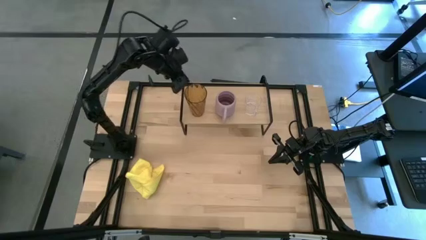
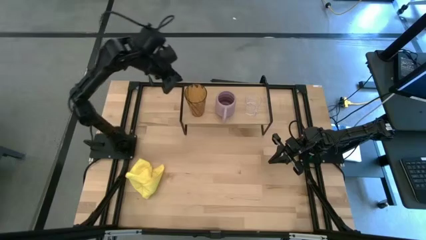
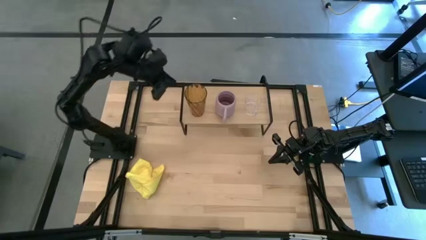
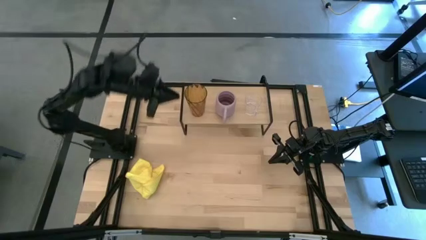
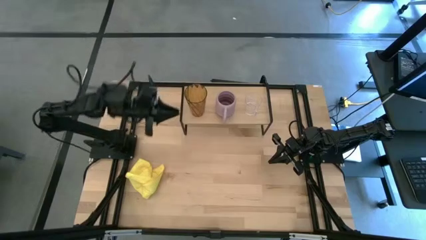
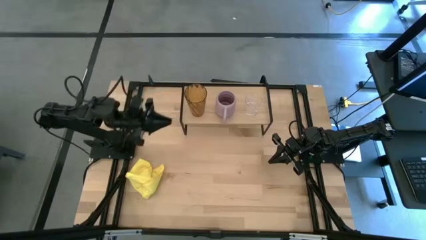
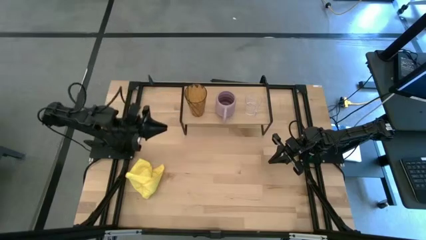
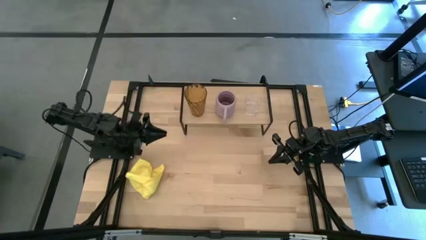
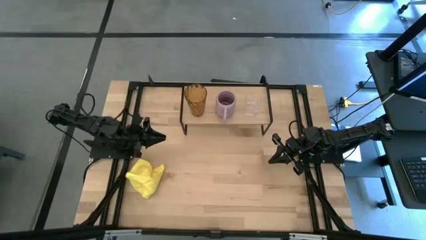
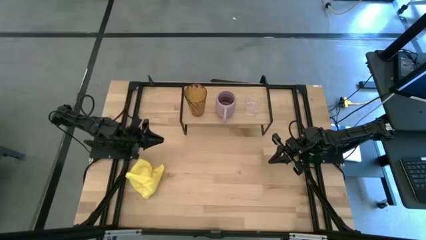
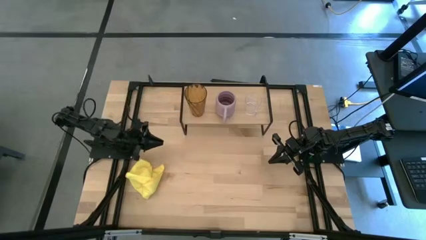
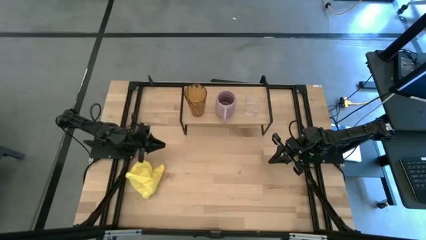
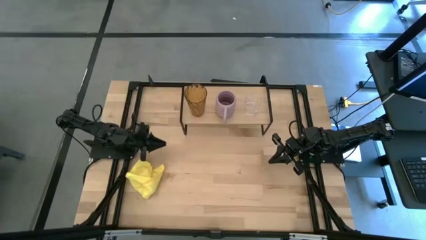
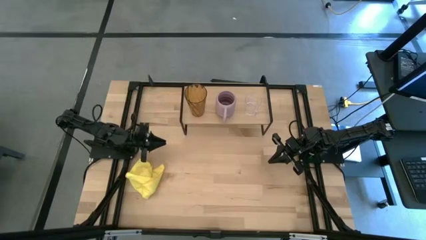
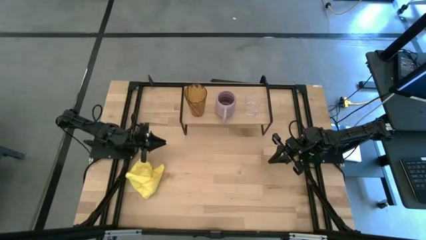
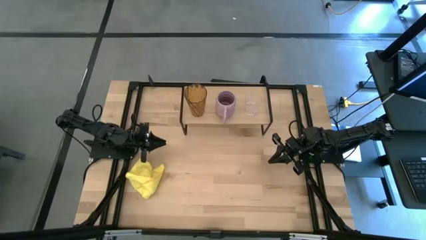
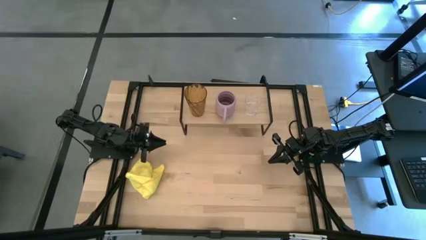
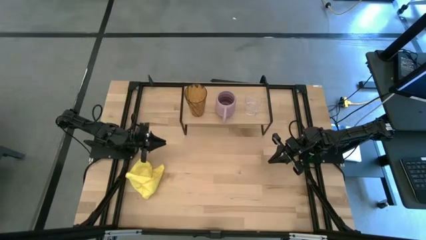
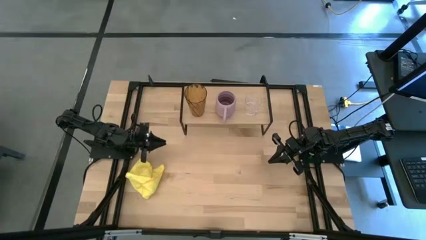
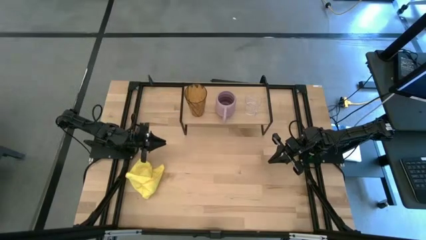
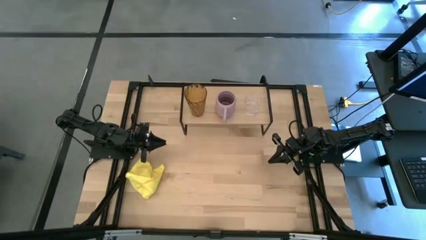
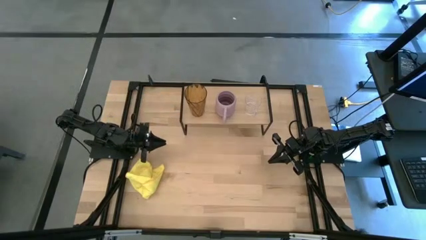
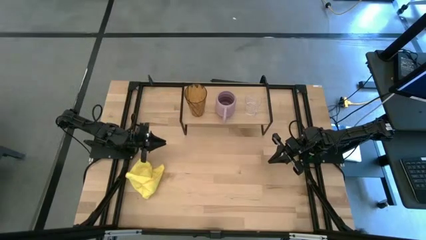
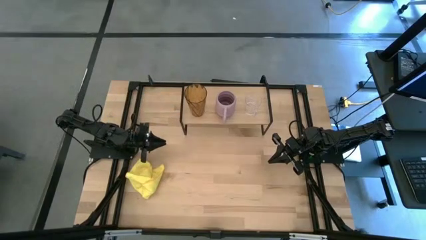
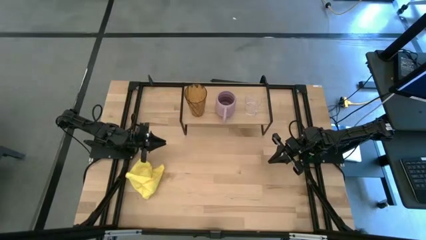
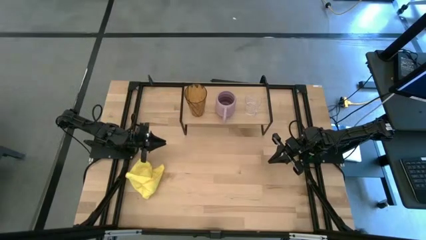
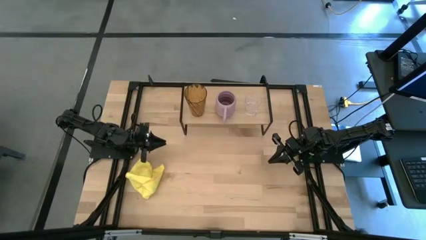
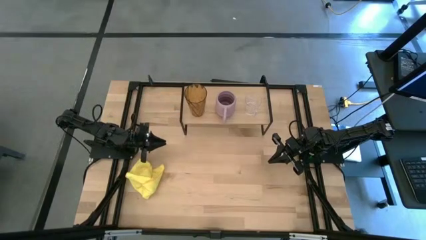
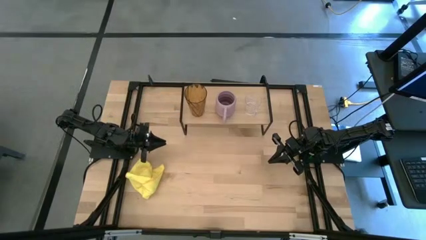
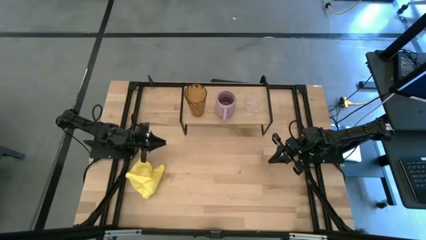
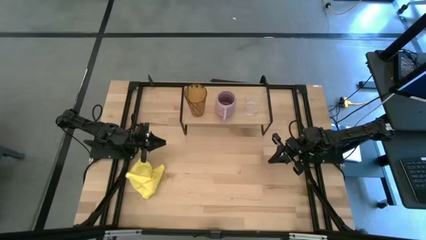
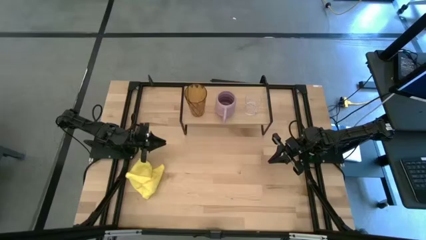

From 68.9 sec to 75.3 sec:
Task: Stack small to large cups/mugs on shelf
Return to Home Position

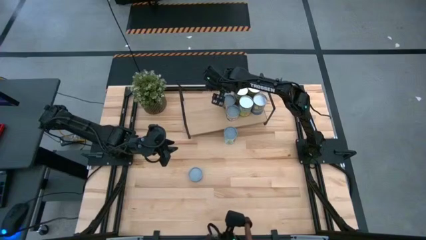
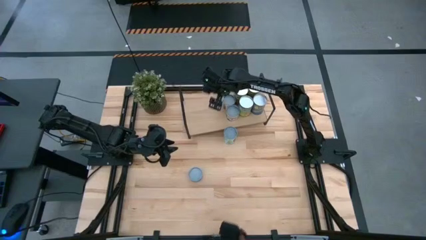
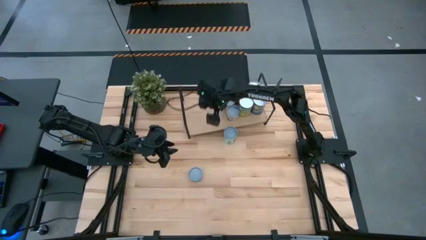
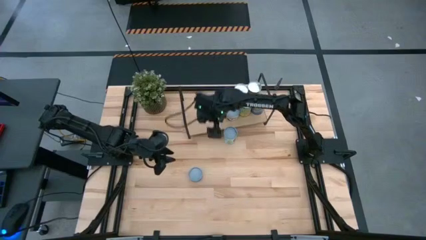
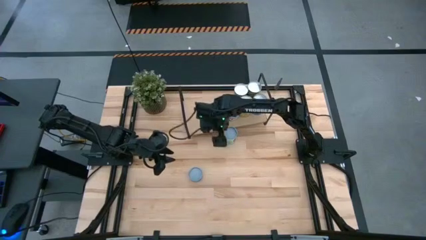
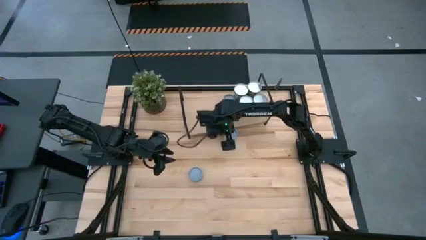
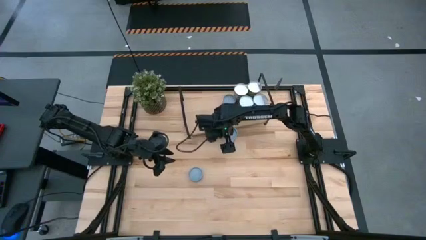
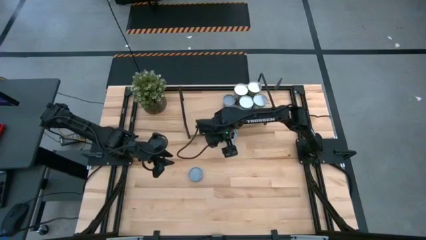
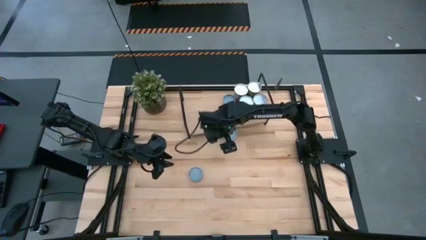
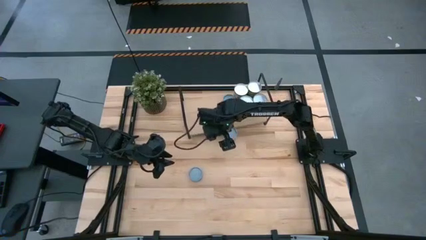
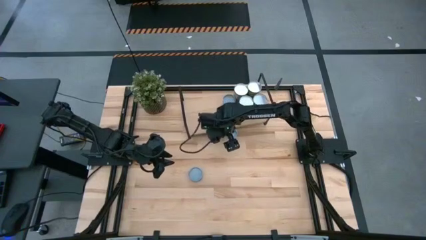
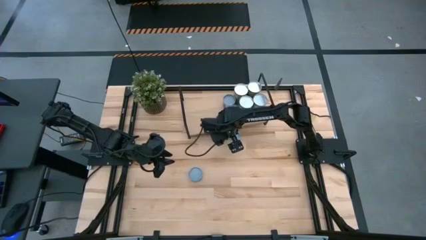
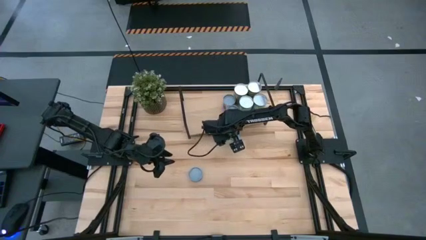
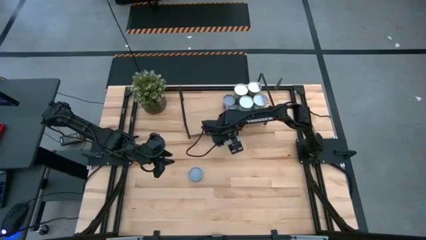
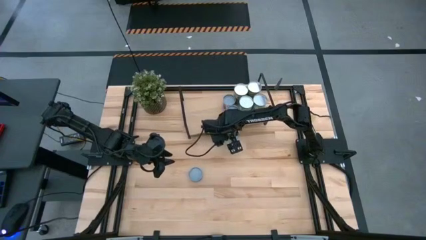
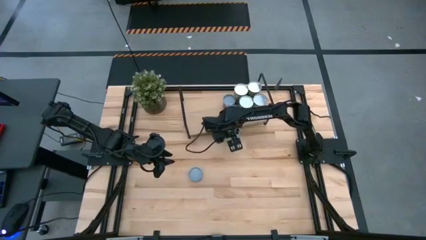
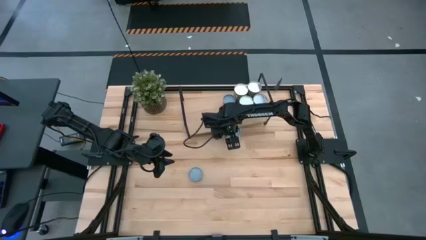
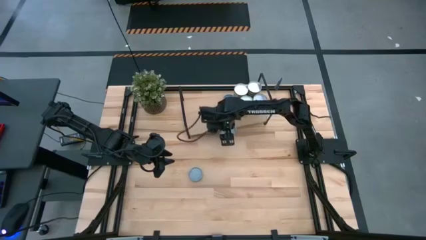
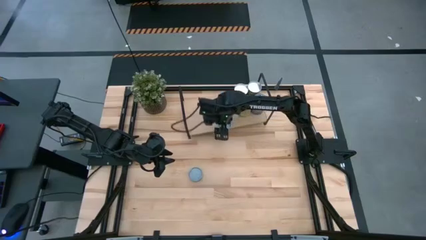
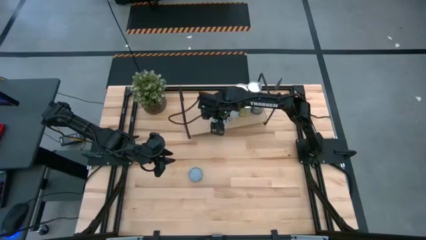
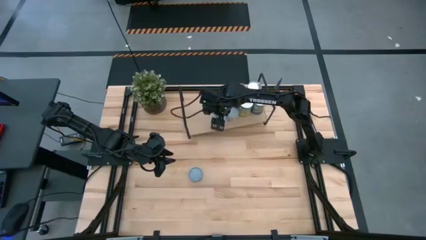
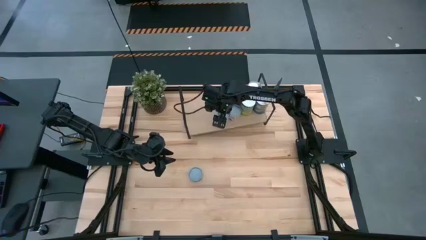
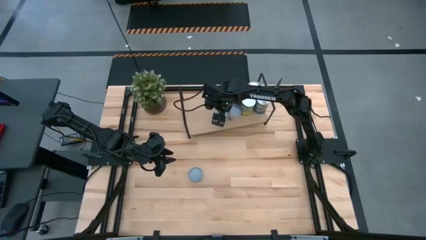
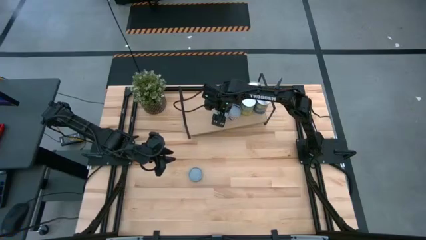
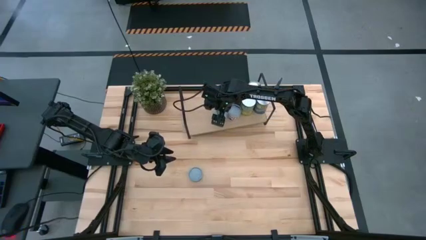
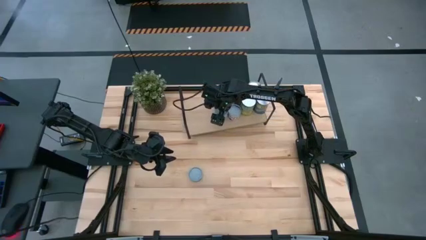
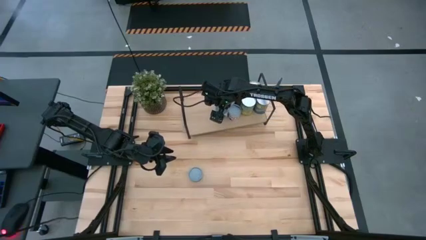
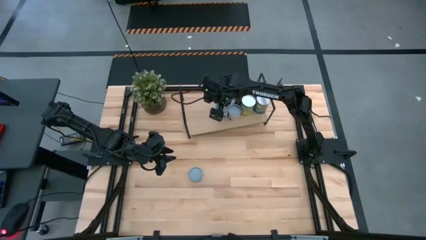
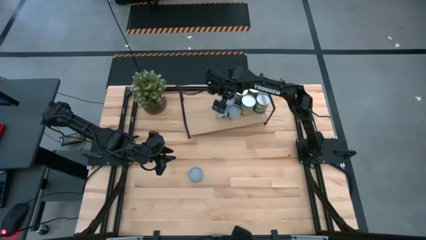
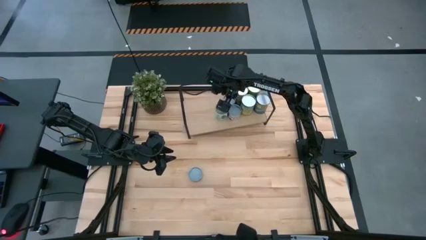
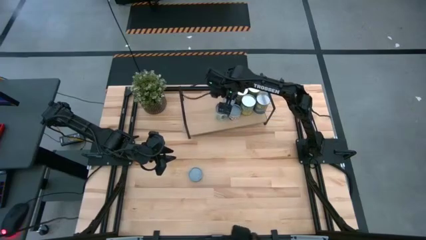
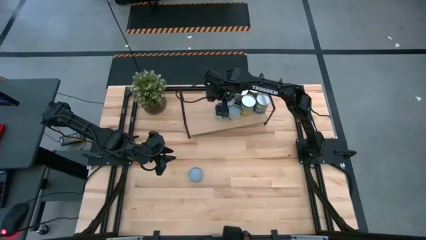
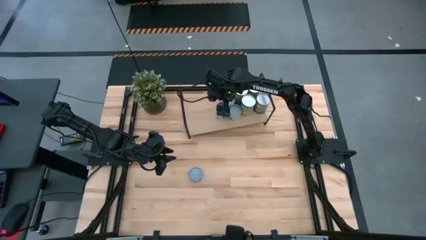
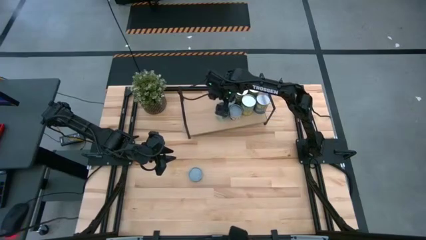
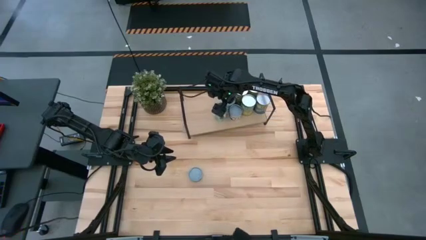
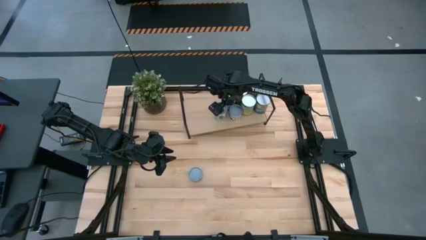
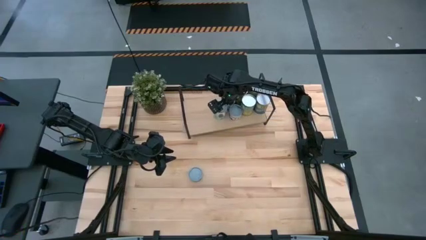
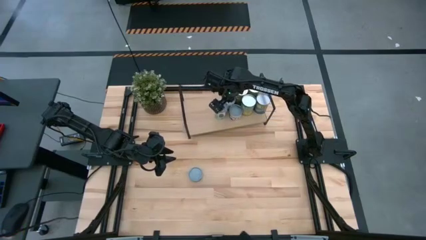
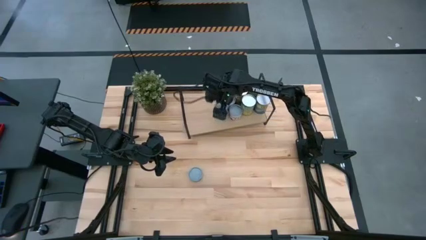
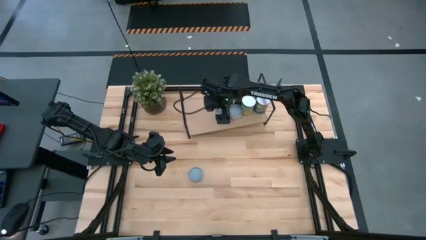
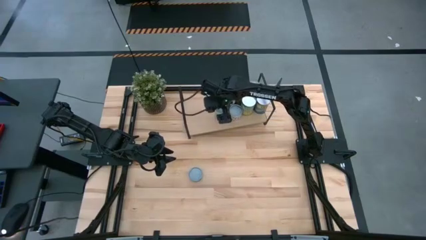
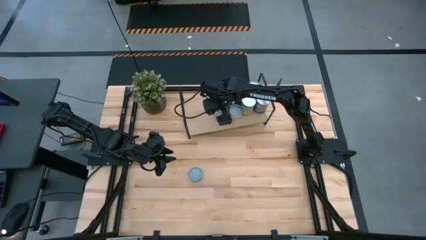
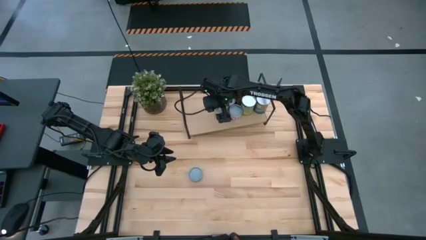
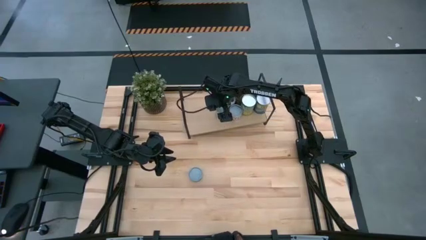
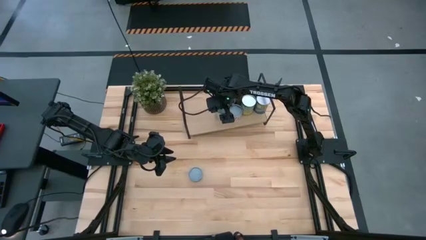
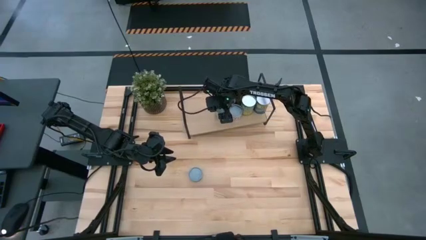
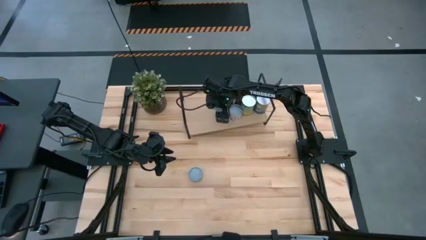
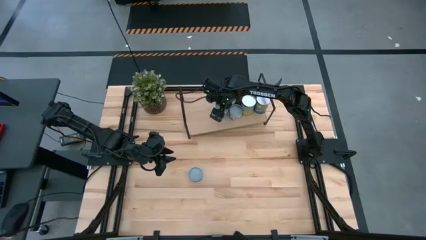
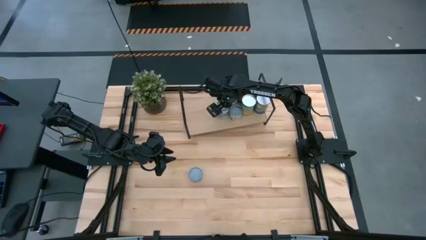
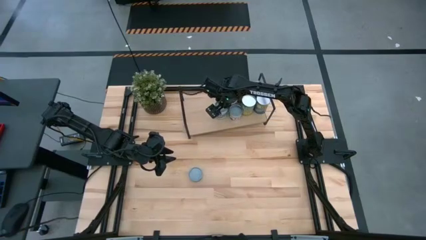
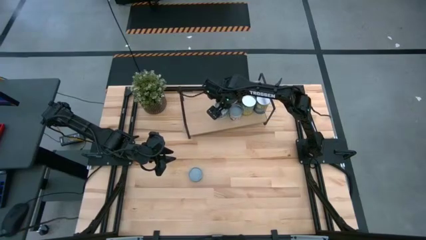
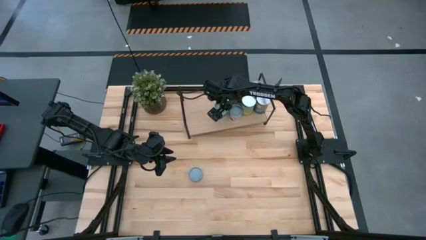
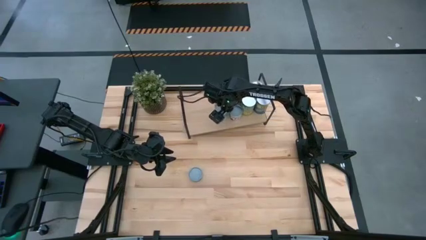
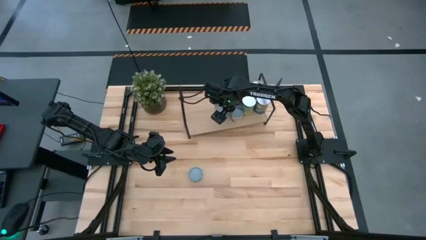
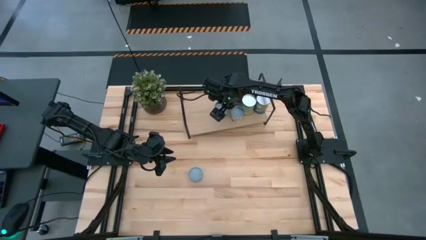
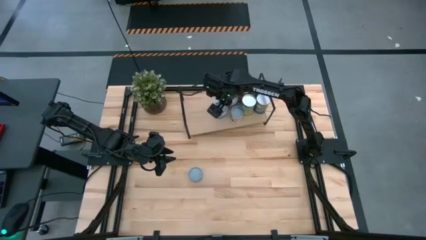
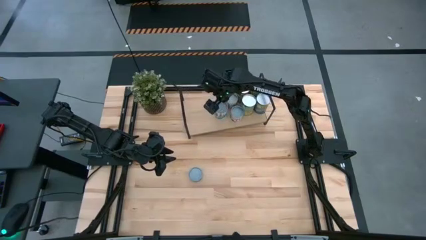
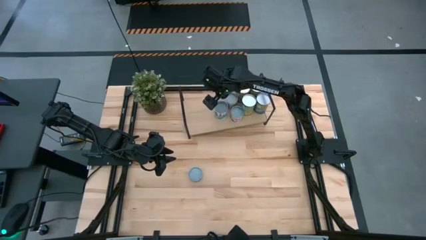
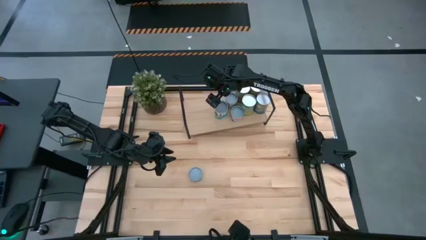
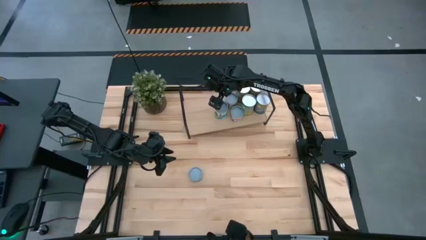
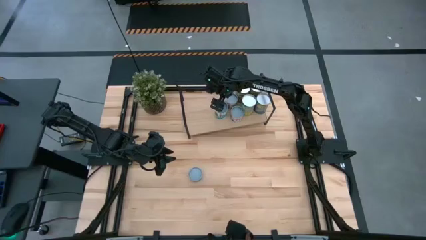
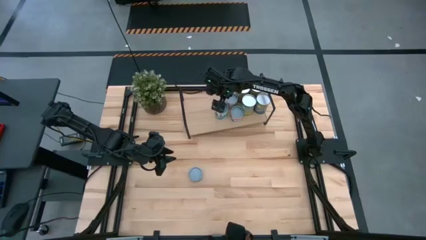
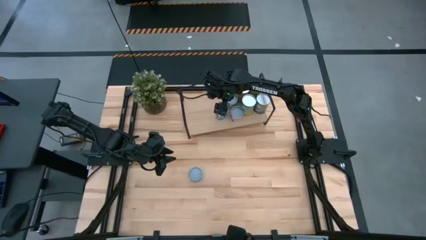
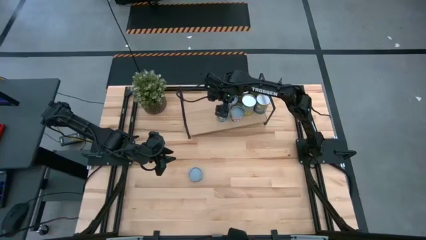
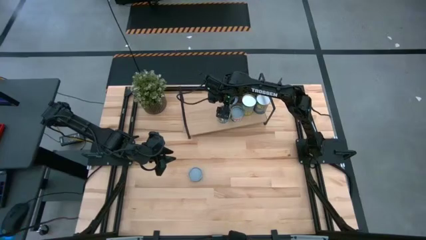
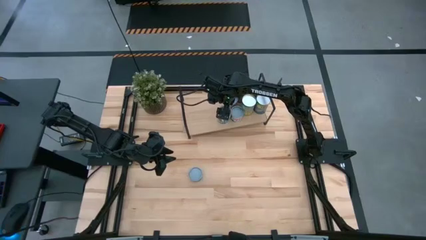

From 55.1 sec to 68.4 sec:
Task: Pick and place cans onto a shelf
Put the mix vegetable can on the shelf
